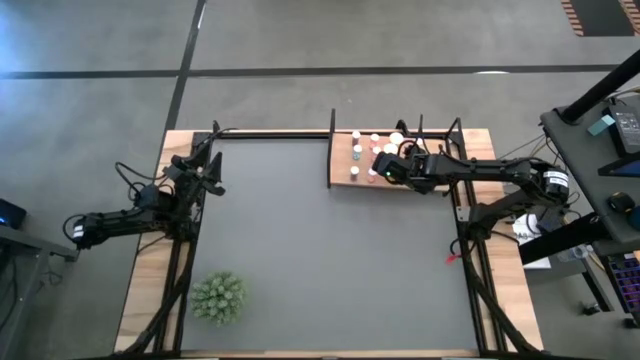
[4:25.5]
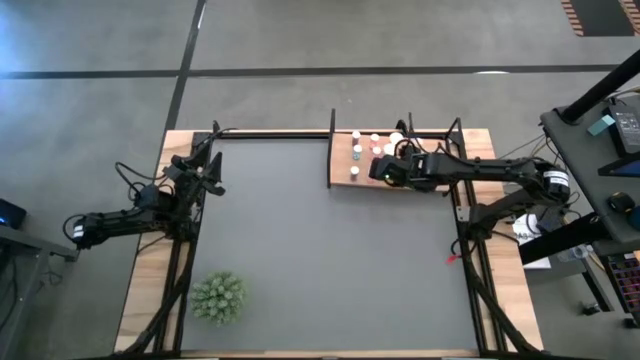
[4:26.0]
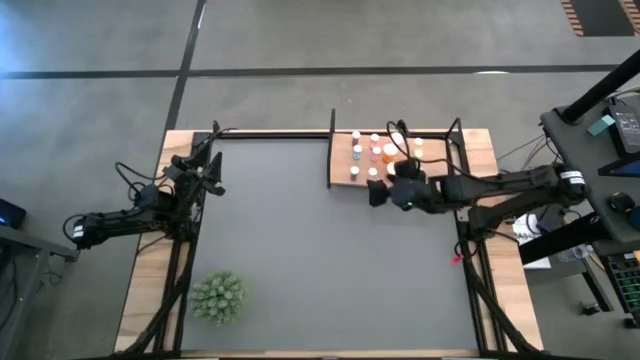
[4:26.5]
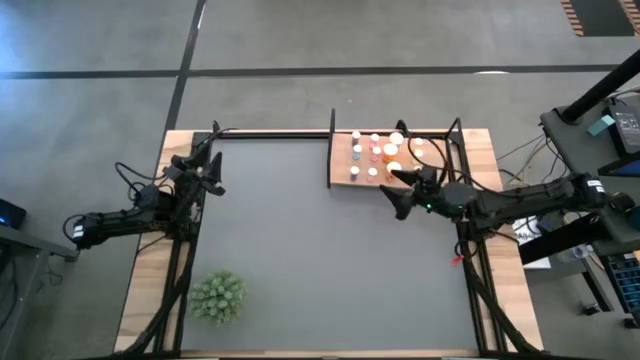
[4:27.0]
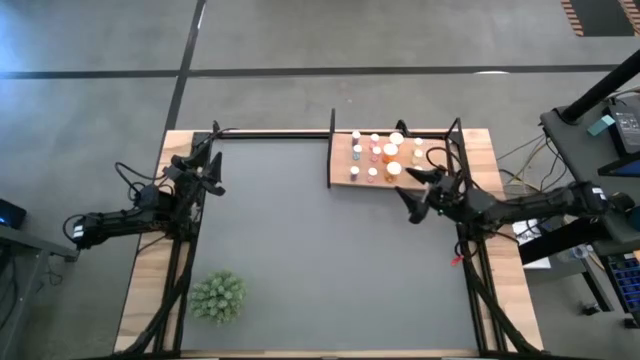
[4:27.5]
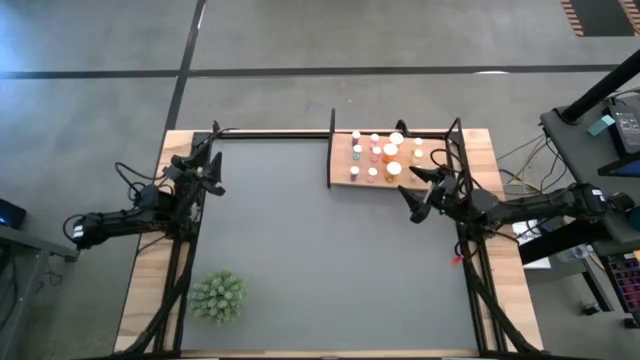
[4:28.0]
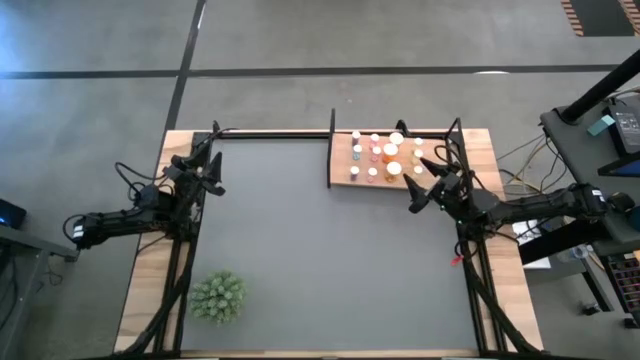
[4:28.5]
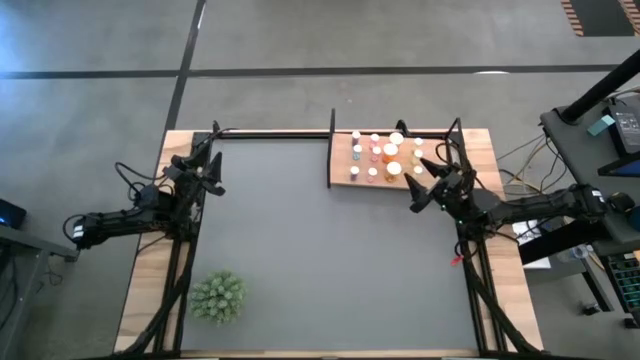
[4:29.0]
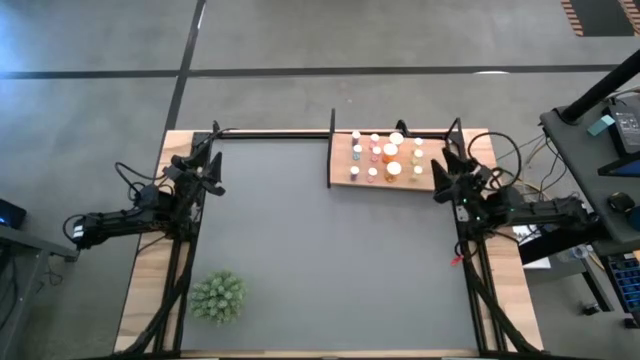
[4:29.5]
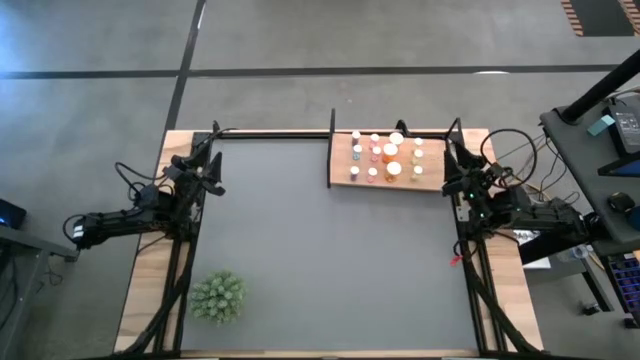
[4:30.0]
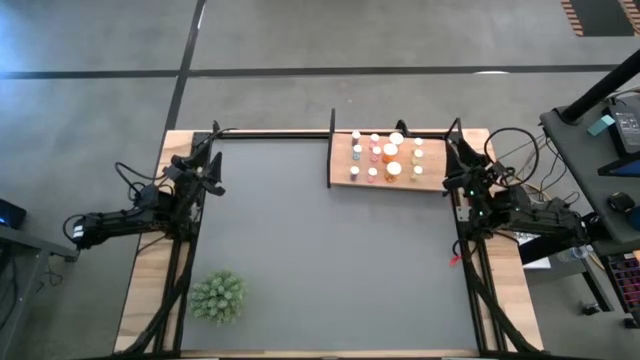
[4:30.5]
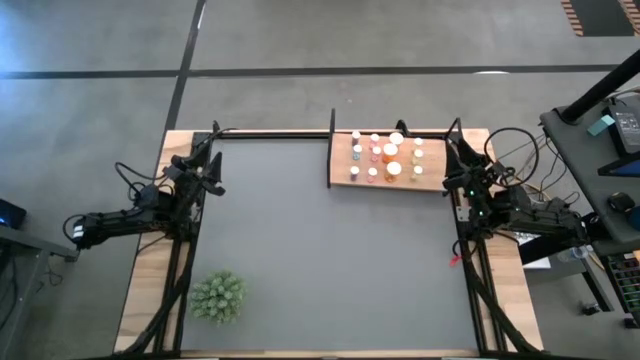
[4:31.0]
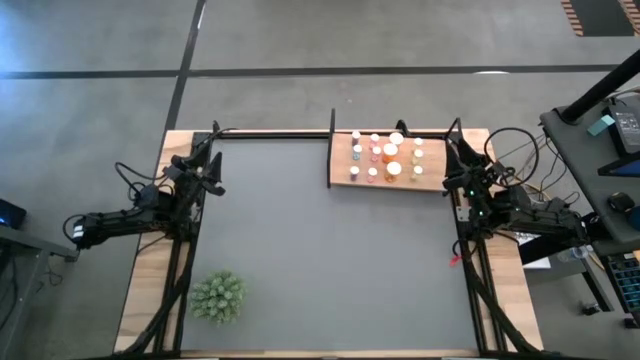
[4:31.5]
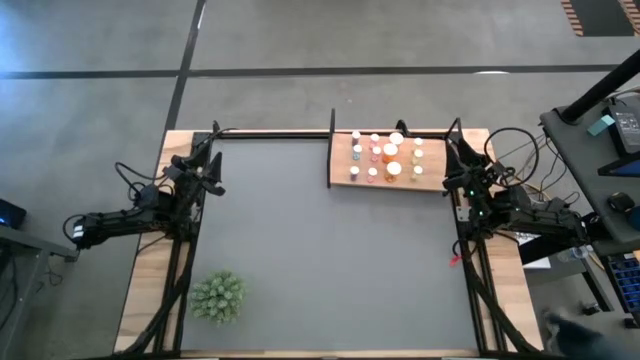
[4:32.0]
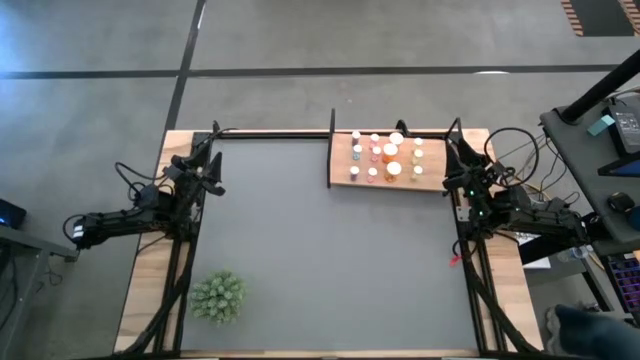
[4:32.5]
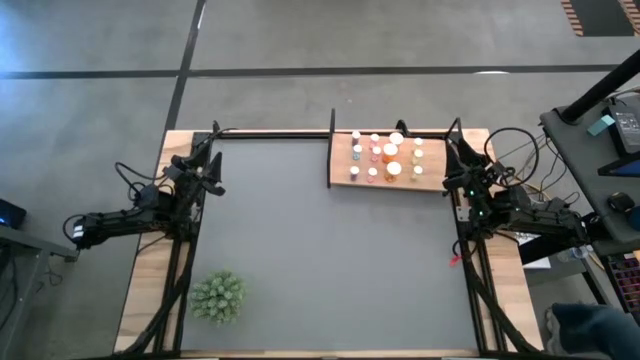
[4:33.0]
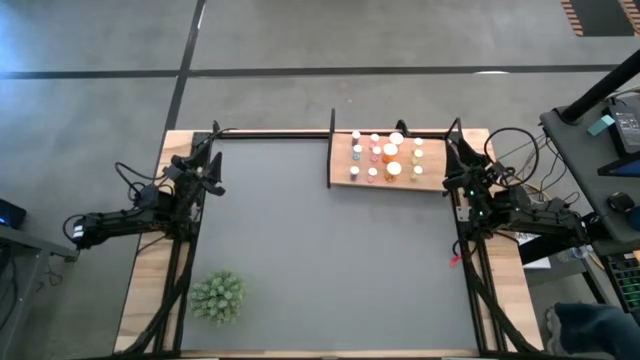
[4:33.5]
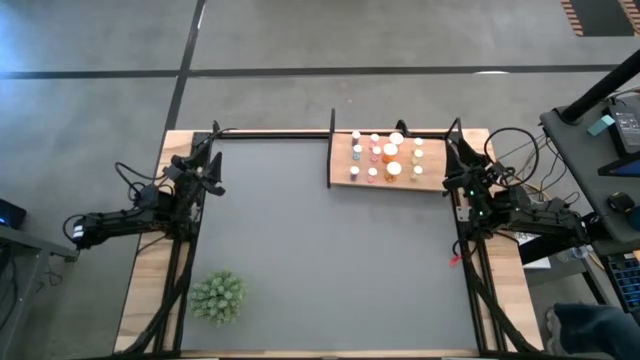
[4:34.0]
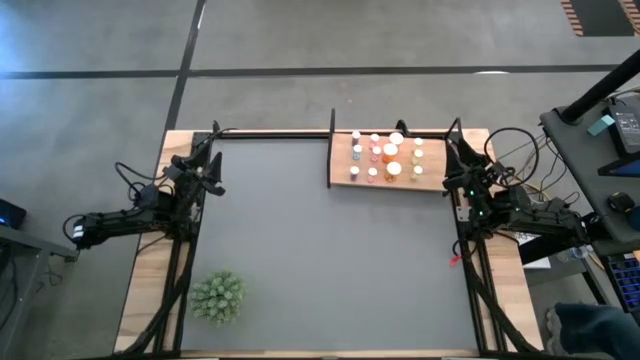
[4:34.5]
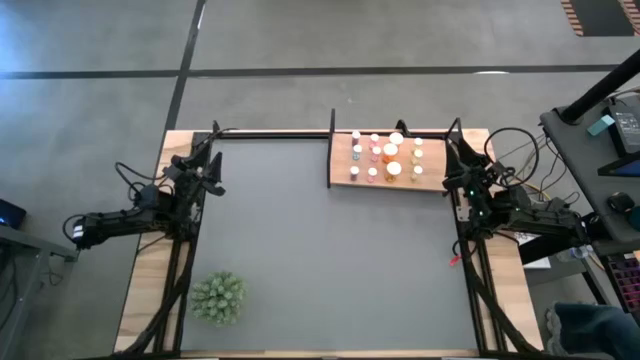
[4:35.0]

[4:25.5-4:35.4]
Task: Pick and place medicine bottles onto shelf by color
Return to Home Position

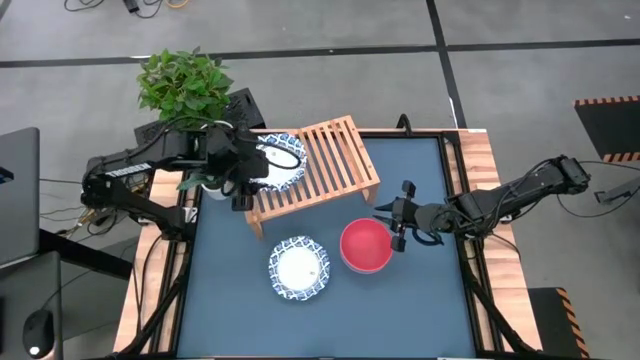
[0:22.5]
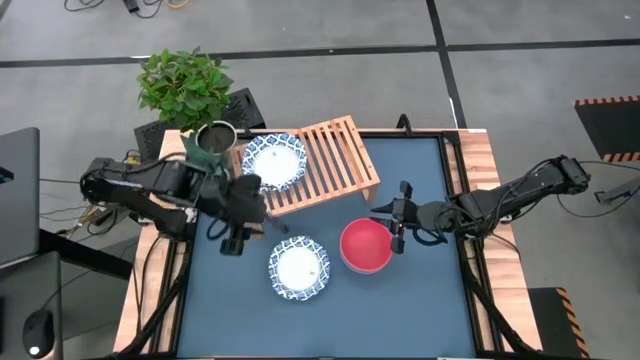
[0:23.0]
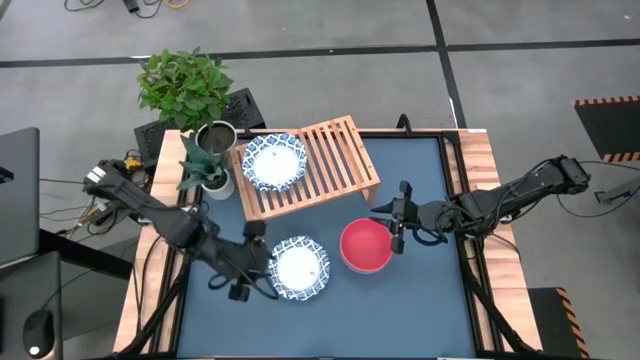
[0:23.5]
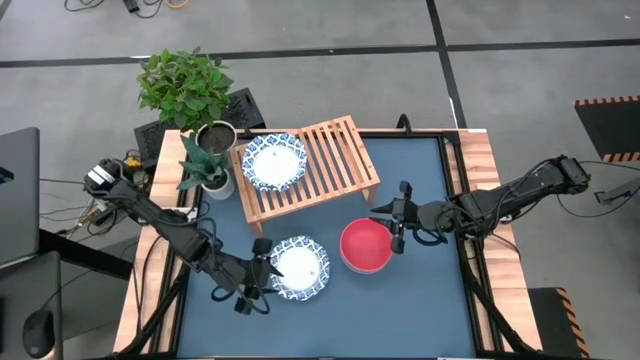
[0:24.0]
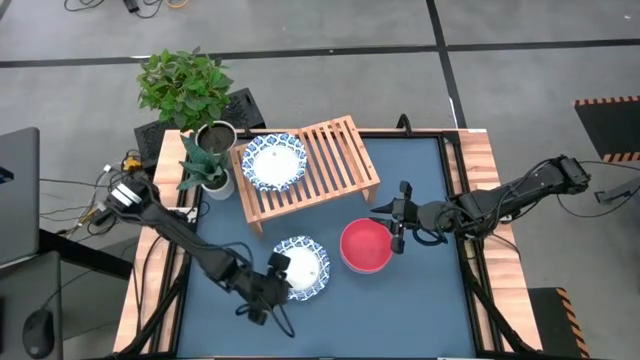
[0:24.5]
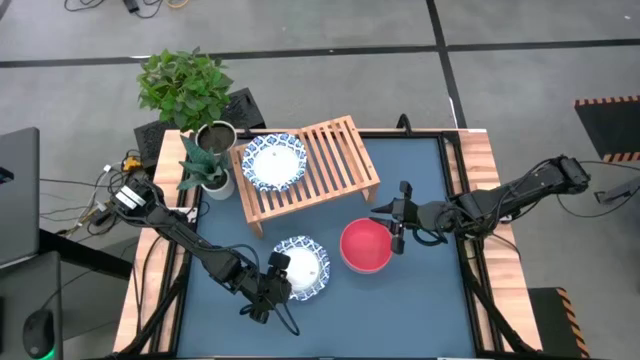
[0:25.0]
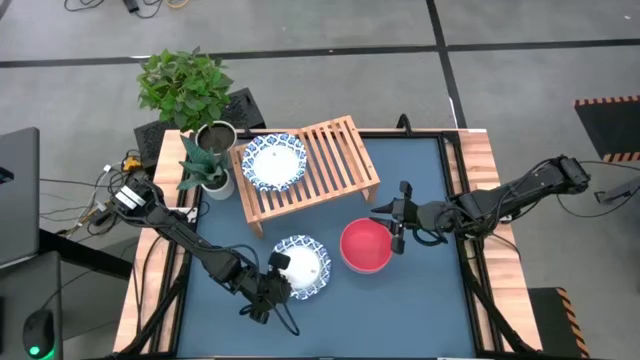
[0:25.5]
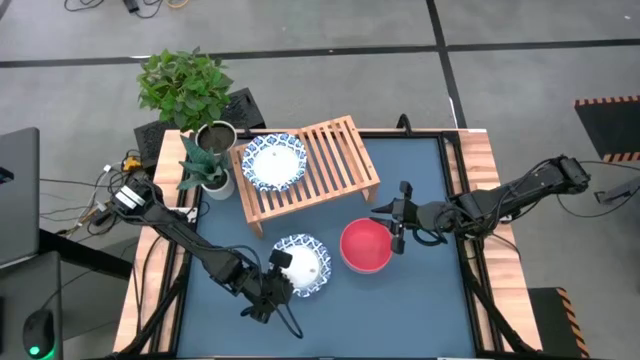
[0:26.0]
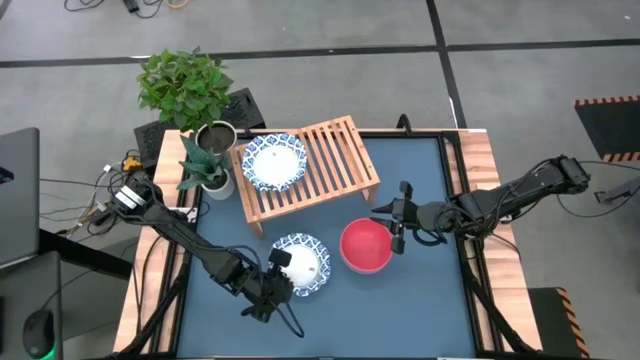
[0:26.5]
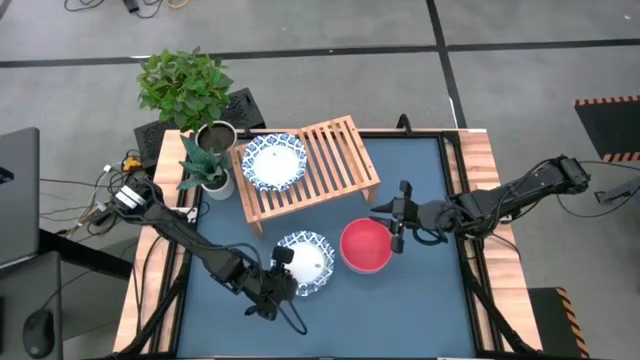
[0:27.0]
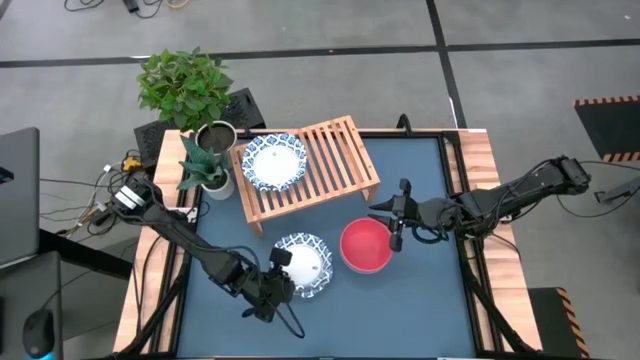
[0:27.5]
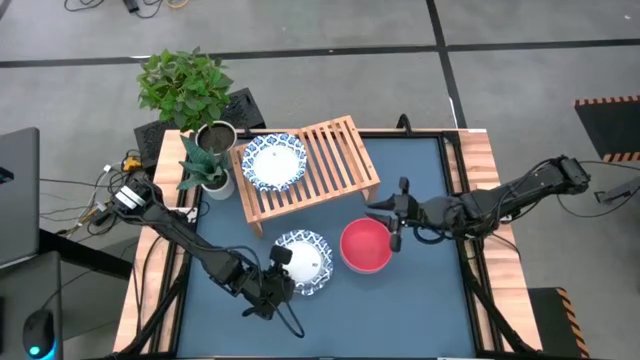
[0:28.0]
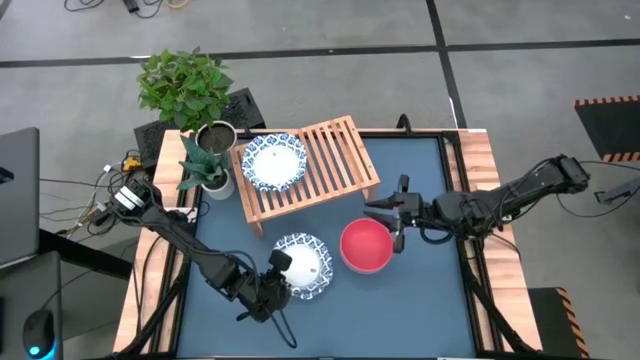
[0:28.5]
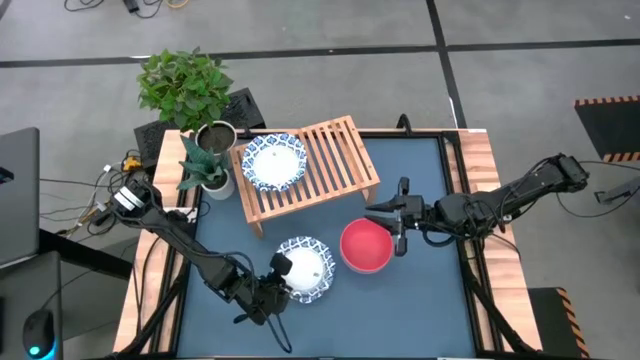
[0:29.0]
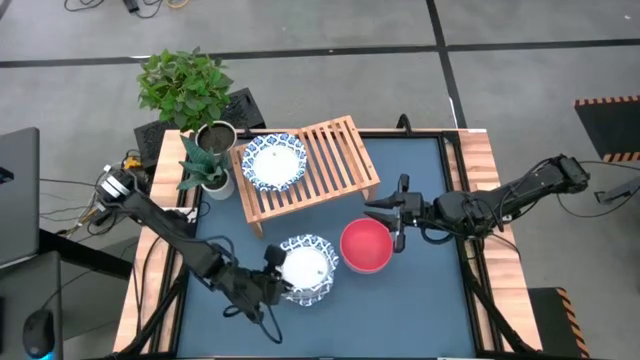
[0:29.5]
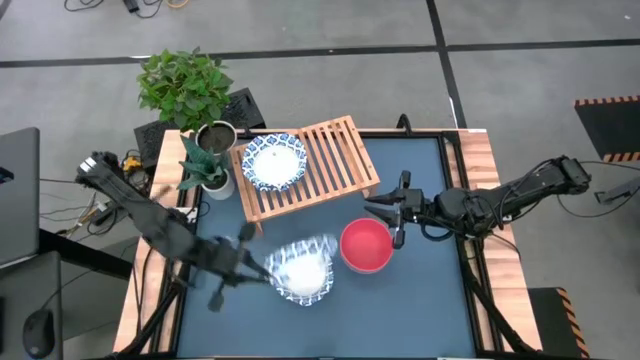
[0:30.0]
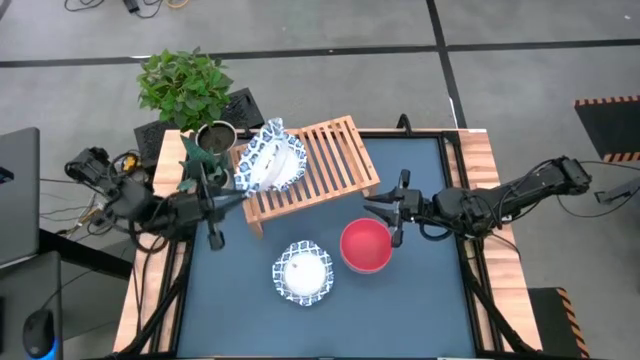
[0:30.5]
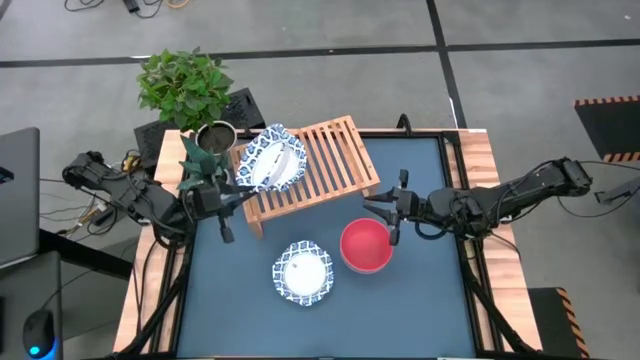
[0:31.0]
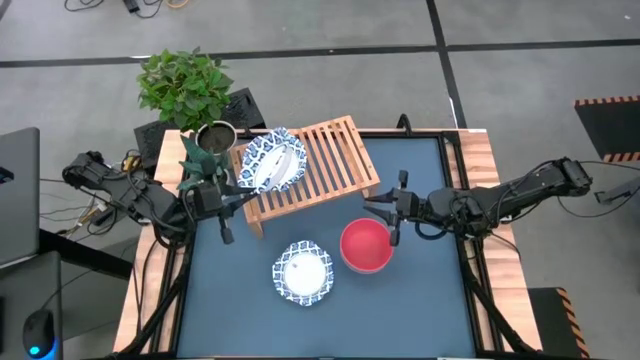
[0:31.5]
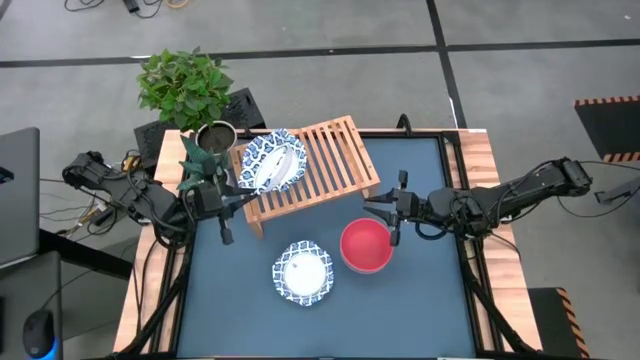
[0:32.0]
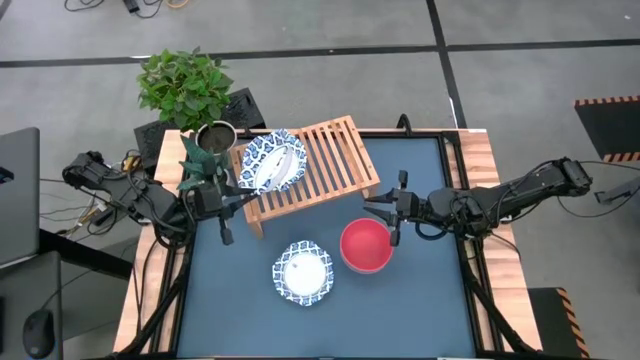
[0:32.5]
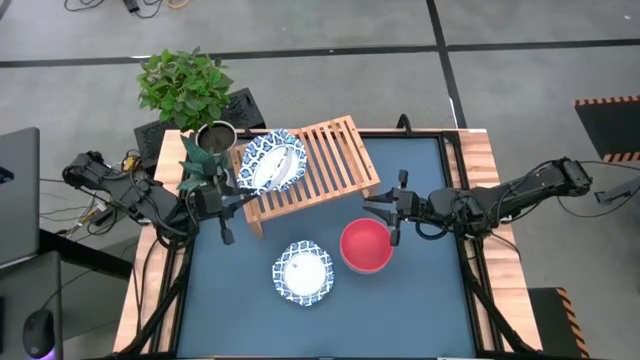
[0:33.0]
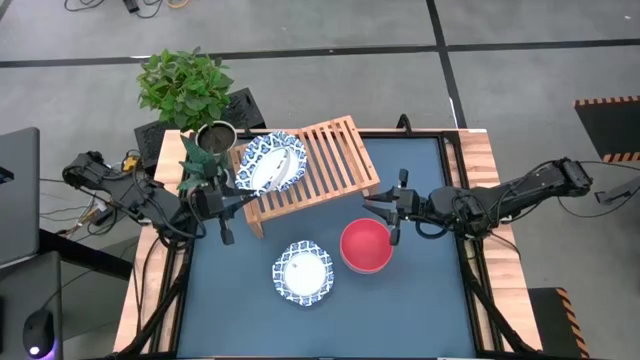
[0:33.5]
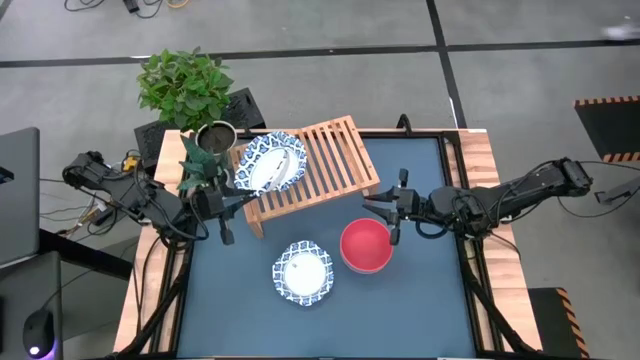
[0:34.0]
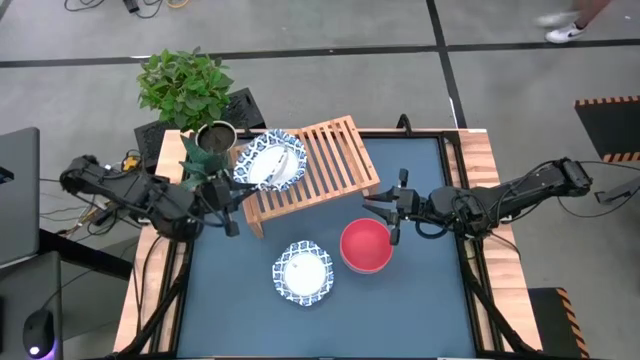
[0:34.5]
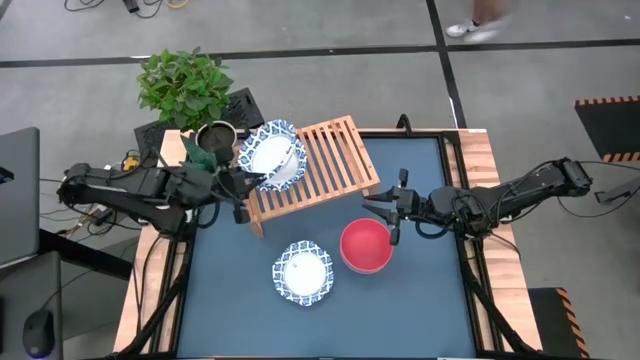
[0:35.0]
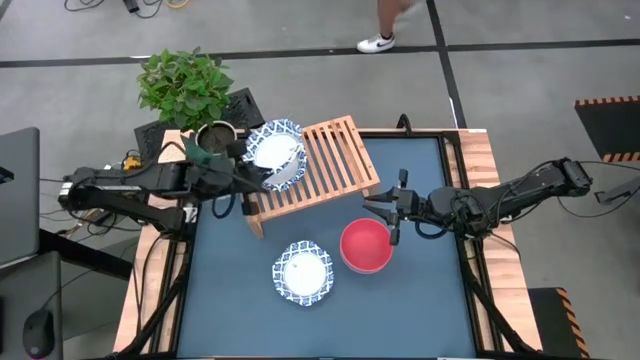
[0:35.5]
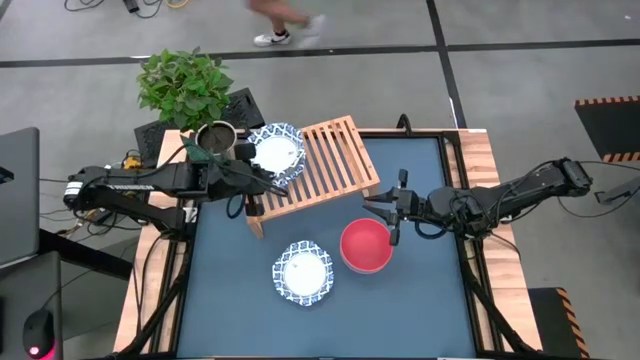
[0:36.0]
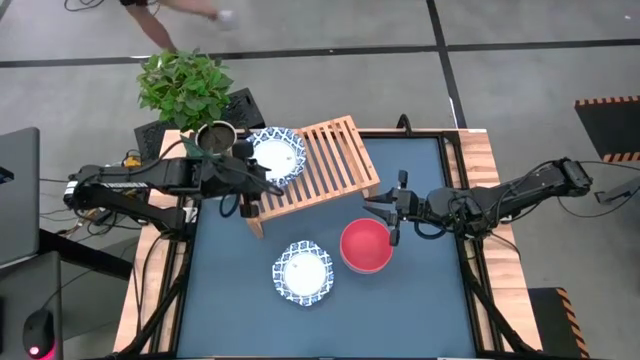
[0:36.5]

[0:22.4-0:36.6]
Task: Place and stack bowls onto a shelf
Stack the blue patterned bowl on top of the blue patterned bowl on the shelf
